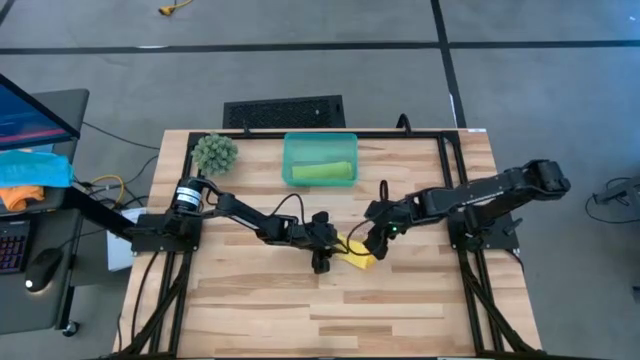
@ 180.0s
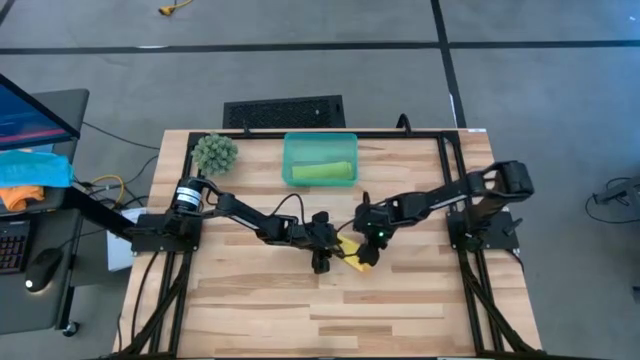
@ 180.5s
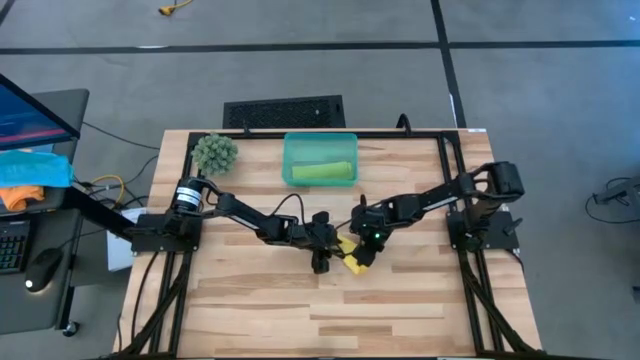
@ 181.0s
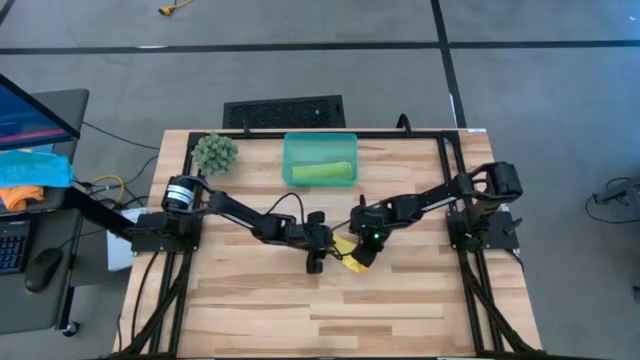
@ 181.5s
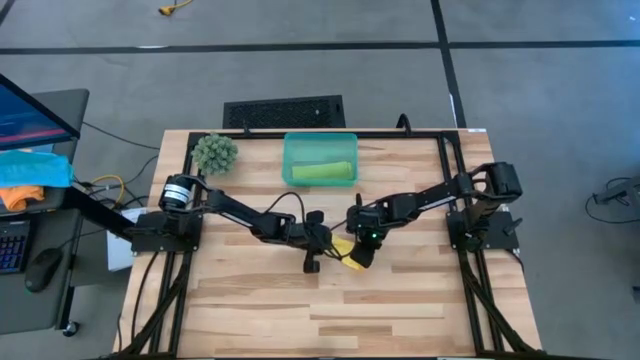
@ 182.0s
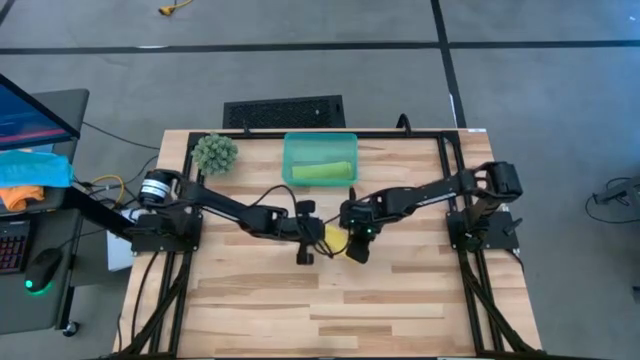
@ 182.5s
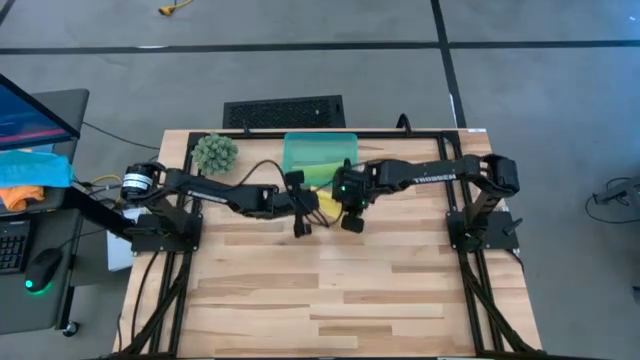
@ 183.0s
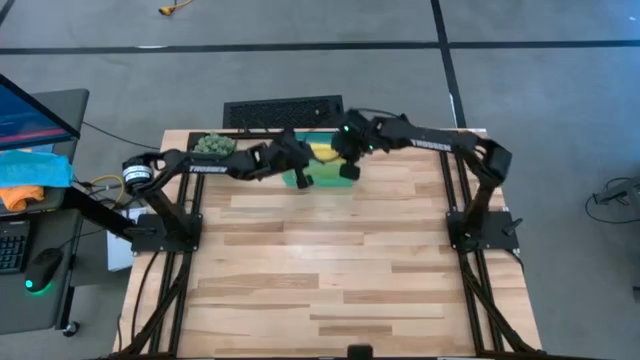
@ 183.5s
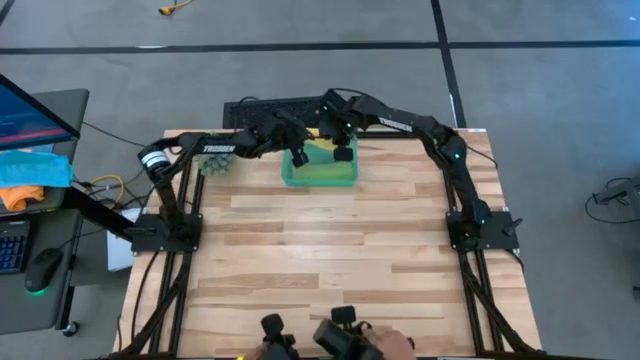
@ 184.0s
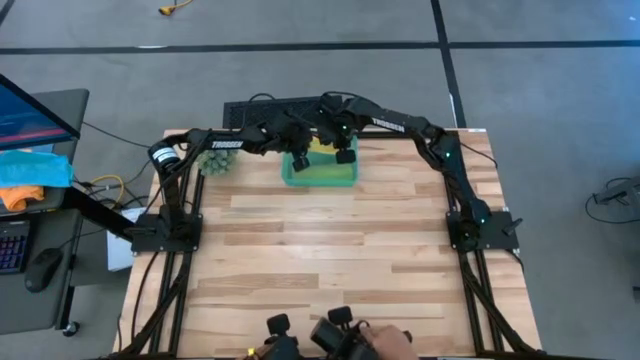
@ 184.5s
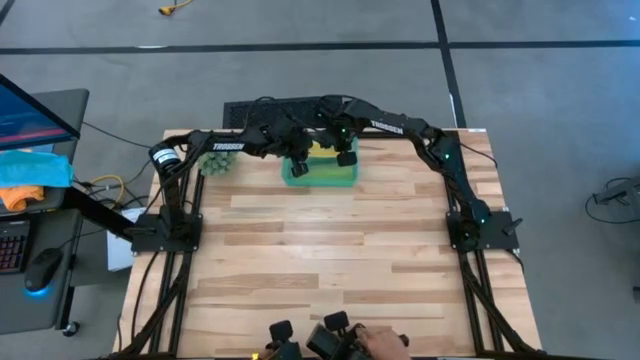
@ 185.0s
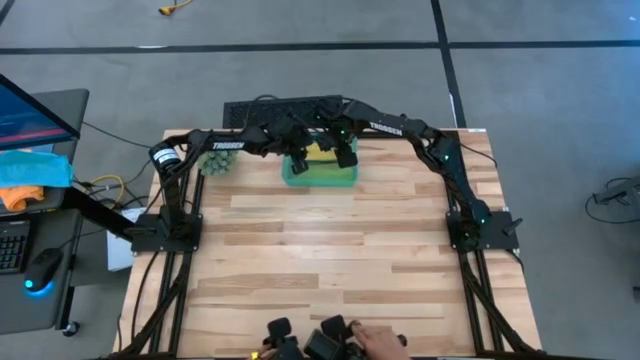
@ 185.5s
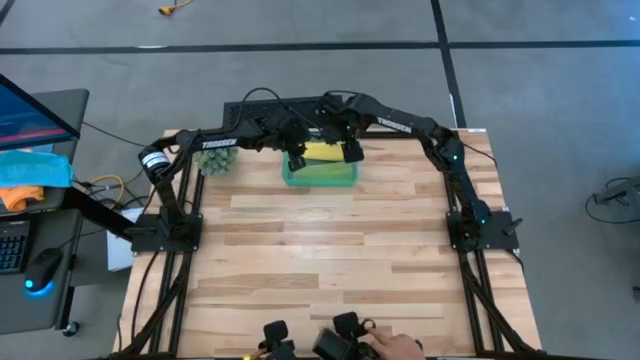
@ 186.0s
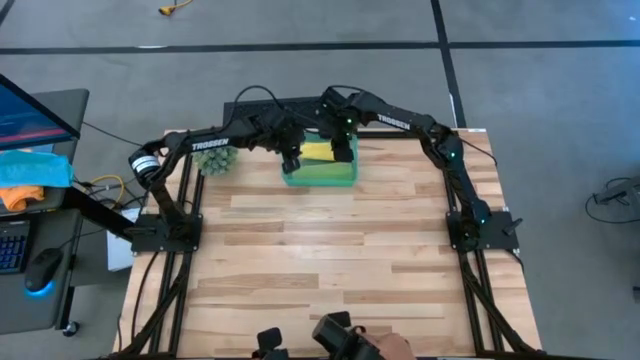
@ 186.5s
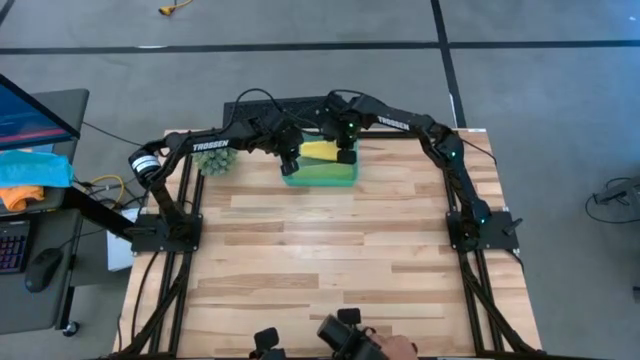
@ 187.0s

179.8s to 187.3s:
Task: Roll microfiber towels into tight, uniform cylinder then place into a basket
Put the yellow microfiber cloth into the blue bin

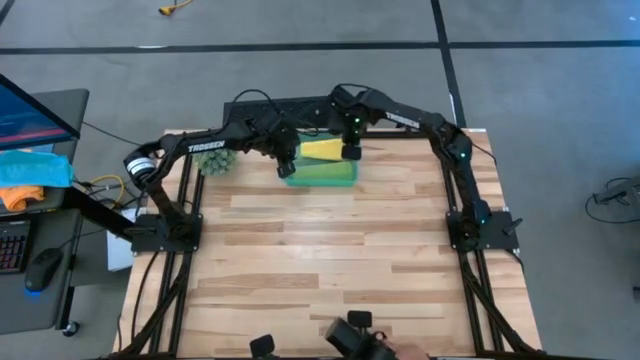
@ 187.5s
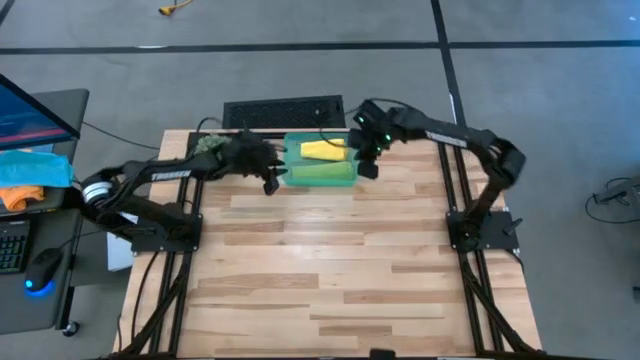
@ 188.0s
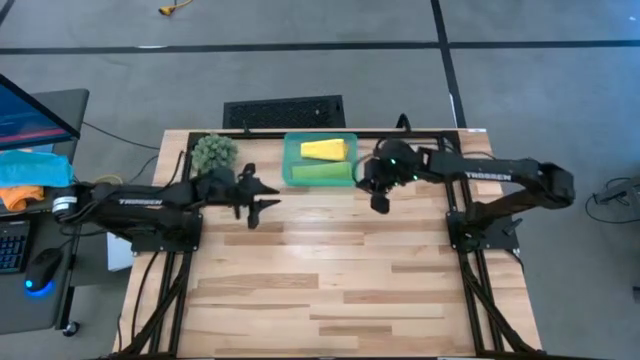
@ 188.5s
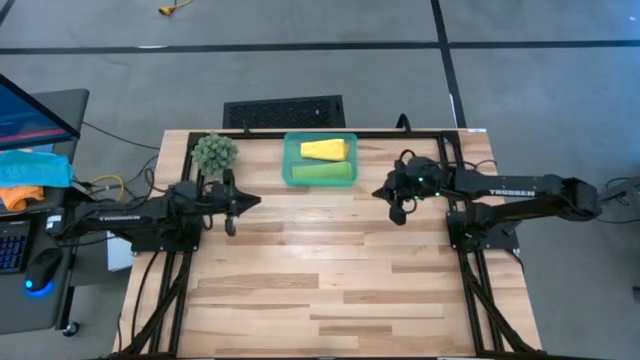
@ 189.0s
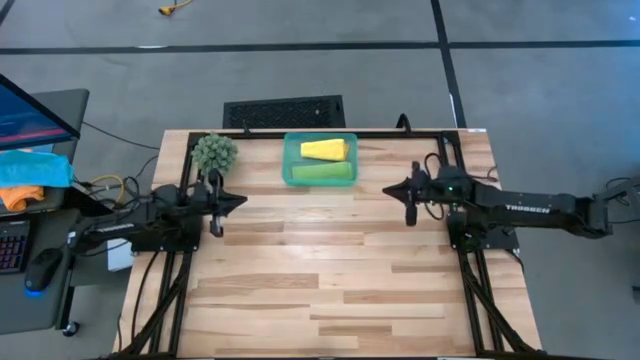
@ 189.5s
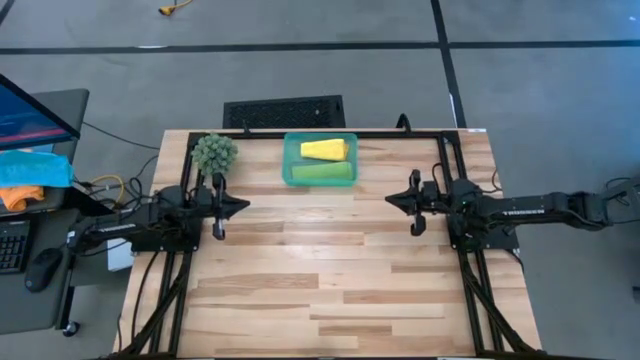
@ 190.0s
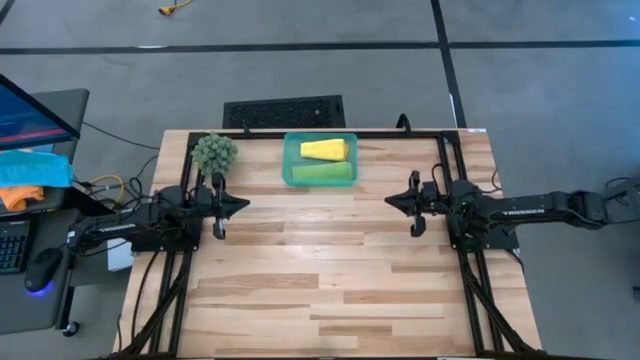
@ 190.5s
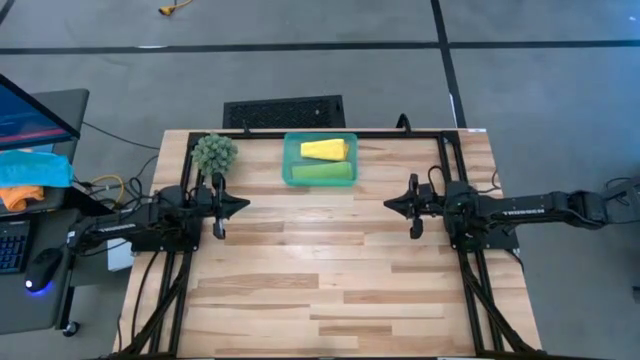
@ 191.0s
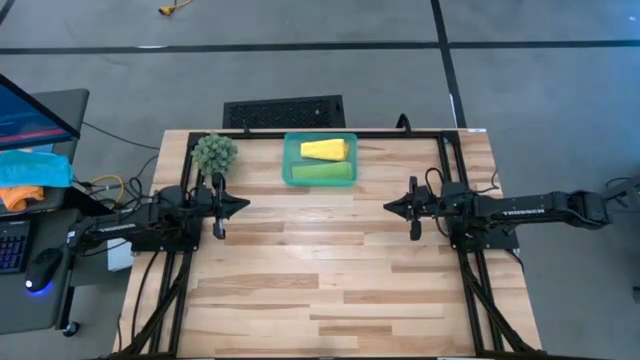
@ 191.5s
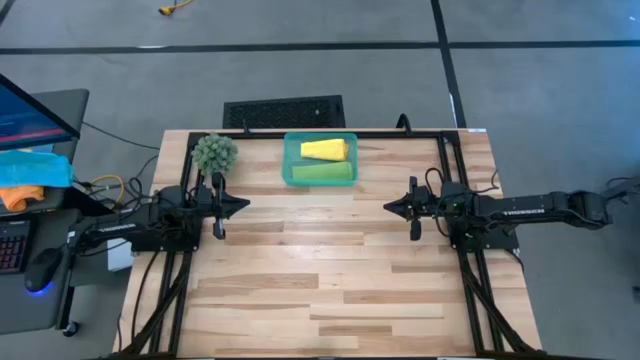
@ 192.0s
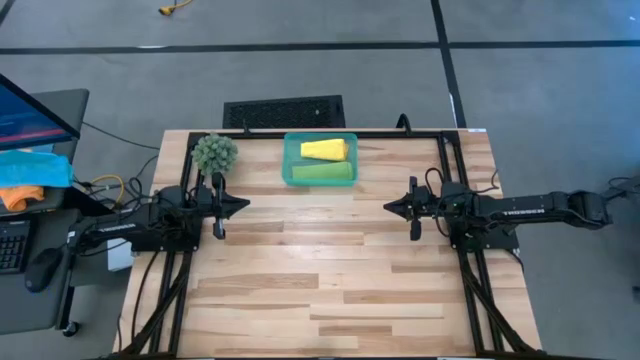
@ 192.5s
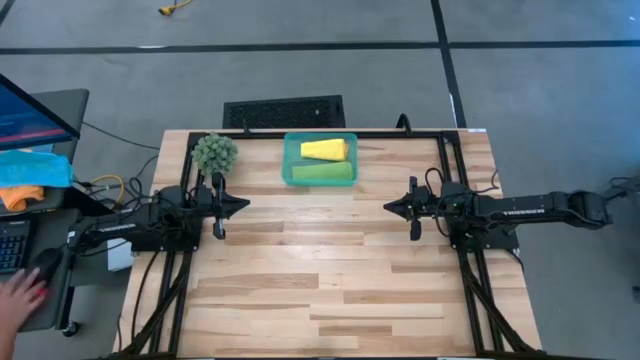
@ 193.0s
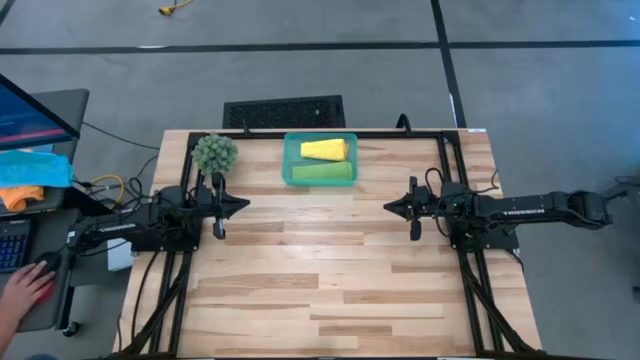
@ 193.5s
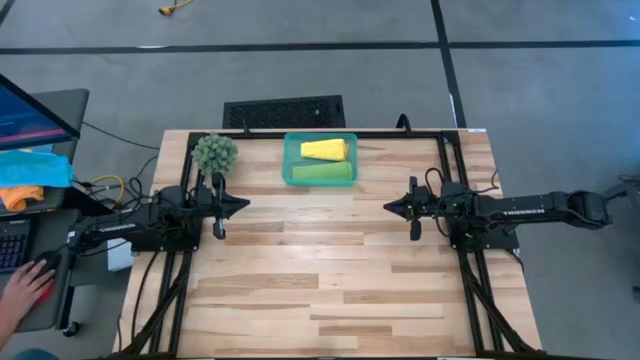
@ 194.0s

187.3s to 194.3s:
Return to Home Position
